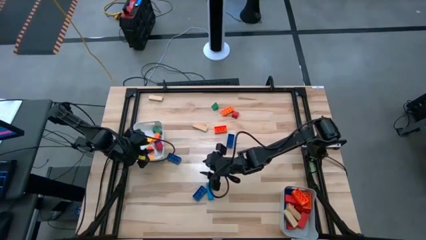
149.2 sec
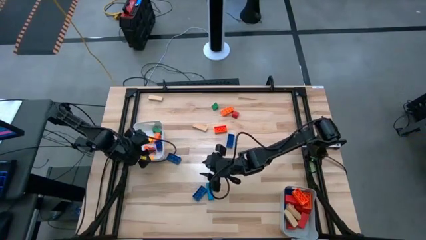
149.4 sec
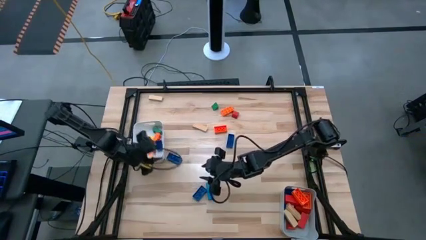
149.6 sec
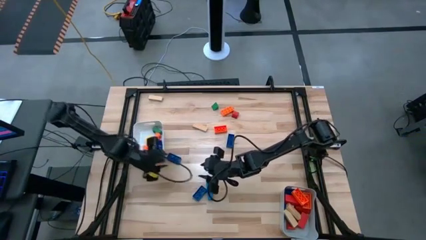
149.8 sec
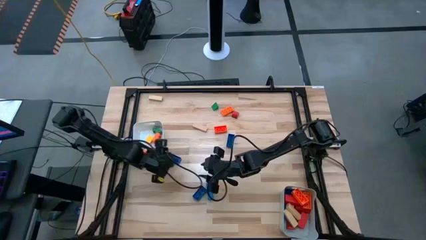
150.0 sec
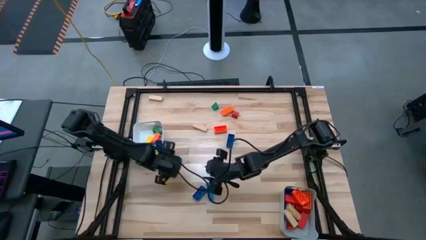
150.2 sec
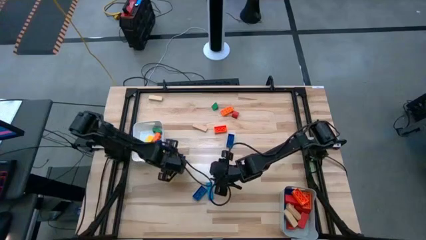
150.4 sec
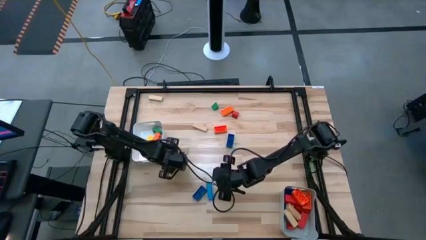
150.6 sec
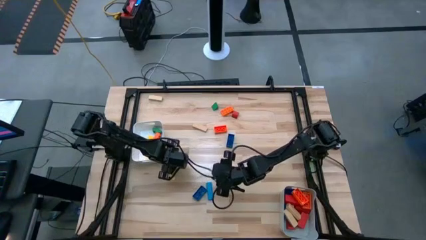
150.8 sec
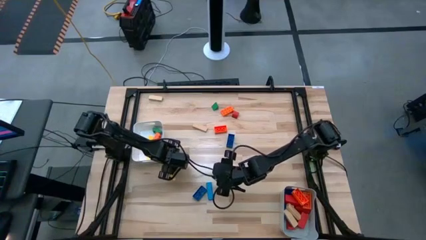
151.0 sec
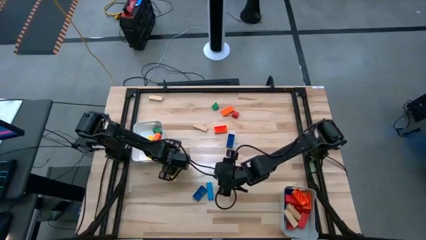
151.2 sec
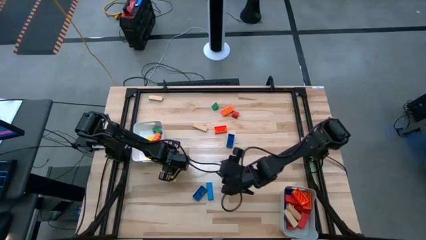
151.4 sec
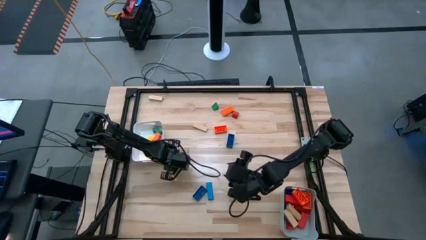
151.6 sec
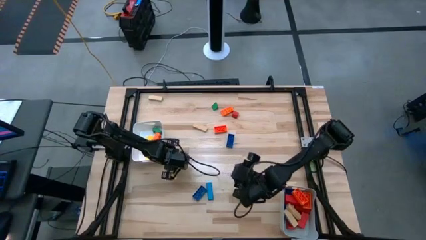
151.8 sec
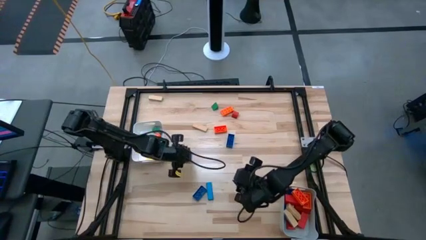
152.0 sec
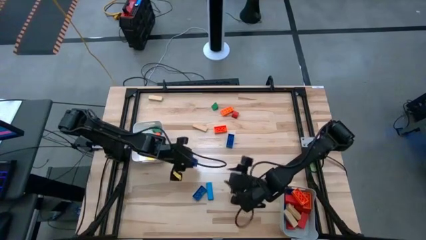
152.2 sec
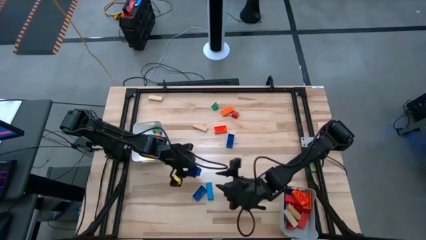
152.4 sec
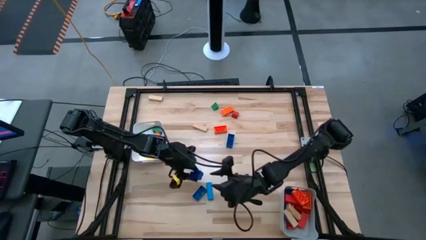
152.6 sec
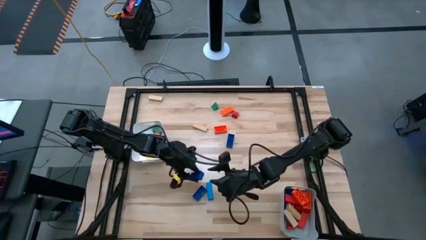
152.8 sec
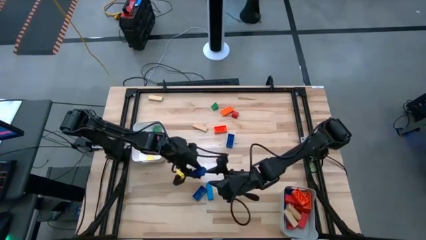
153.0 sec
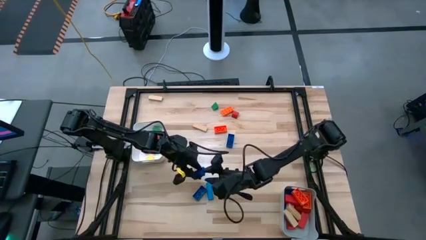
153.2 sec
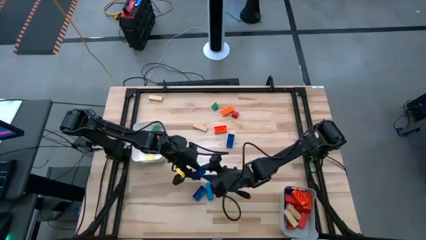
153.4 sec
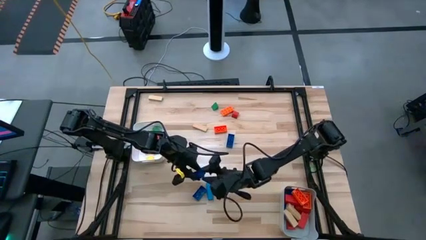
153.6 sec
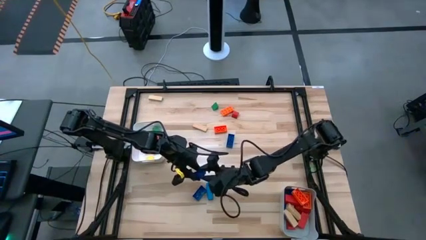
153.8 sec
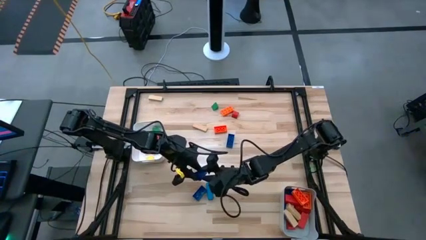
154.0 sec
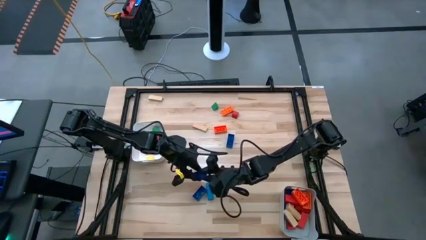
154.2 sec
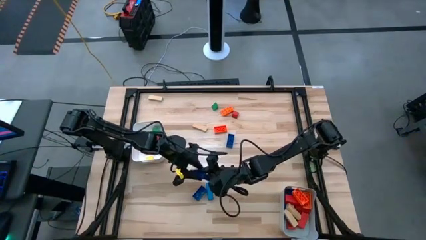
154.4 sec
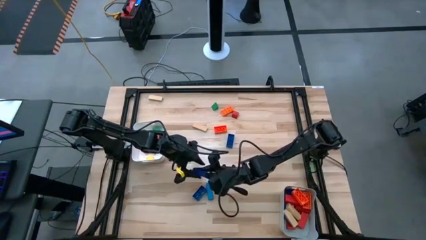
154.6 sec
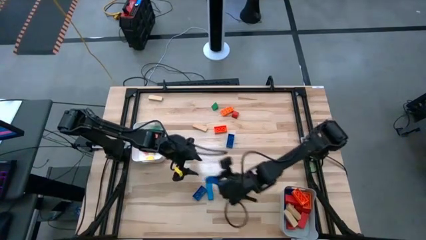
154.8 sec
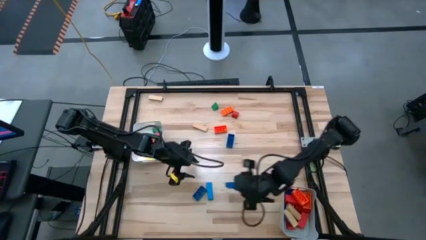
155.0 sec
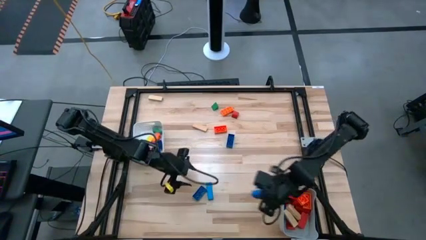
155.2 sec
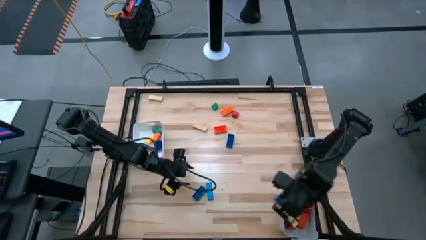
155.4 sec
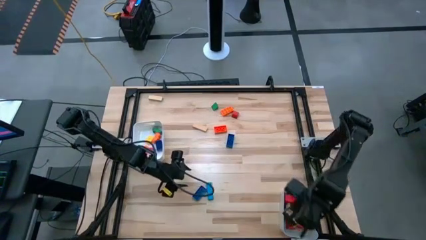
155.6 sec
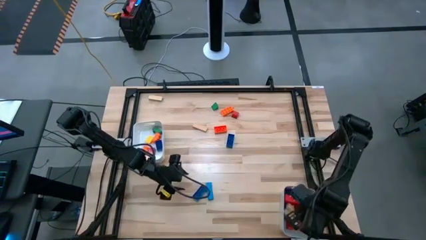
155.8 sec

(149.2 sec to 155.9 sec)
Task: Sort blocks by size
Put the blue large game piece into the gray bin

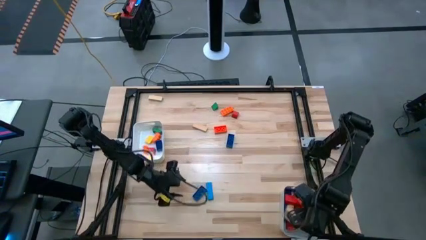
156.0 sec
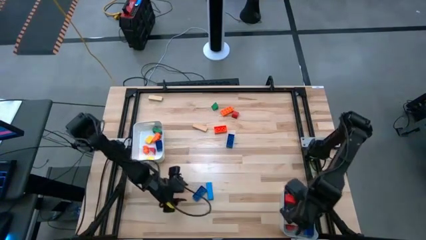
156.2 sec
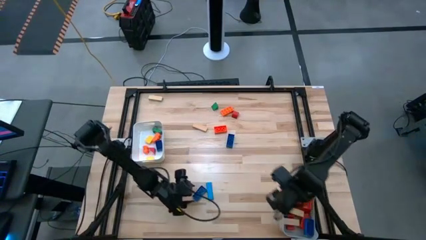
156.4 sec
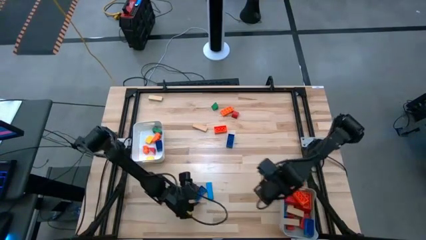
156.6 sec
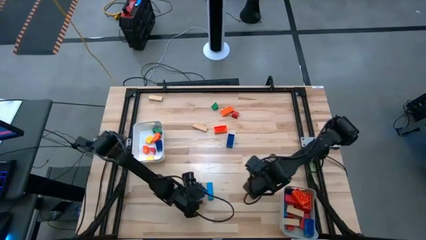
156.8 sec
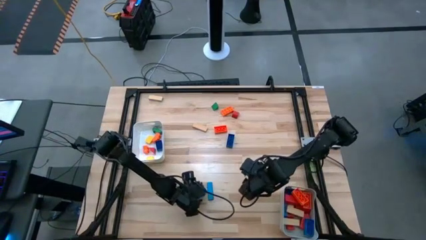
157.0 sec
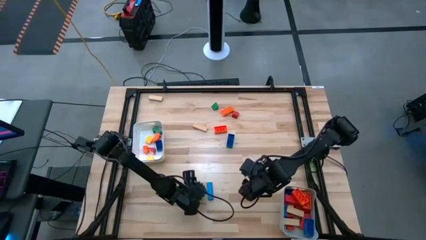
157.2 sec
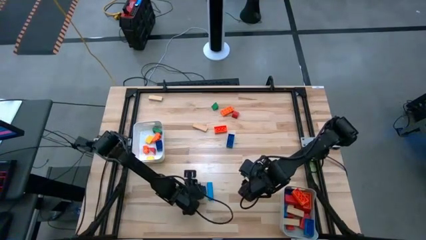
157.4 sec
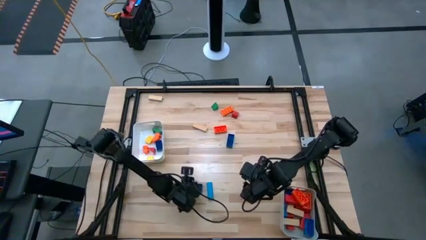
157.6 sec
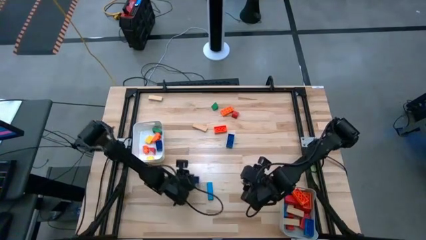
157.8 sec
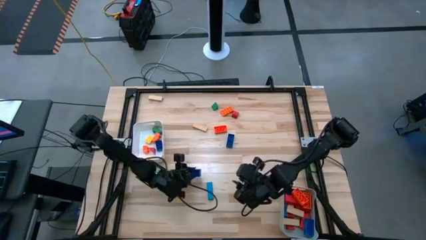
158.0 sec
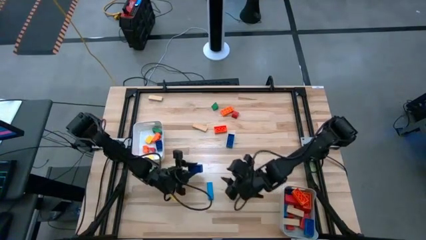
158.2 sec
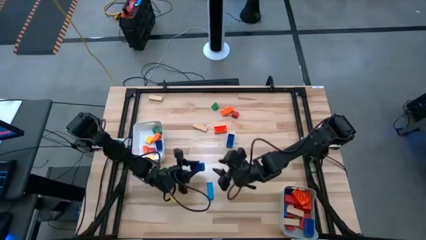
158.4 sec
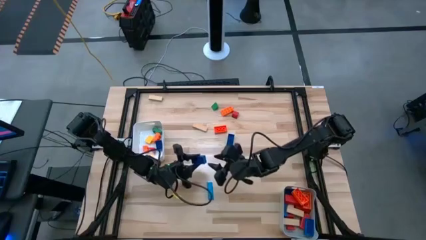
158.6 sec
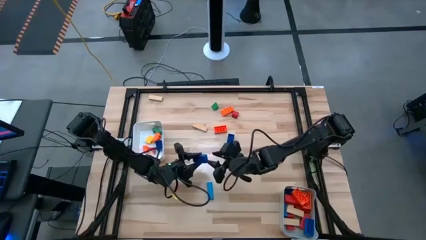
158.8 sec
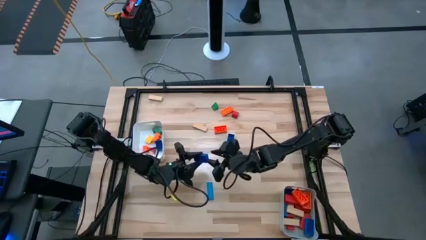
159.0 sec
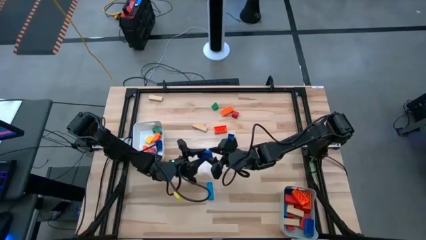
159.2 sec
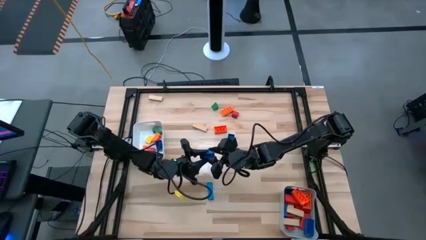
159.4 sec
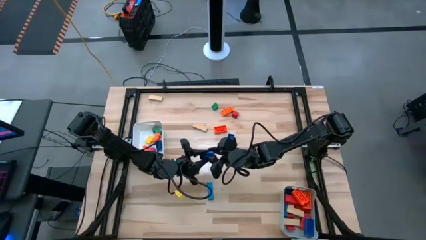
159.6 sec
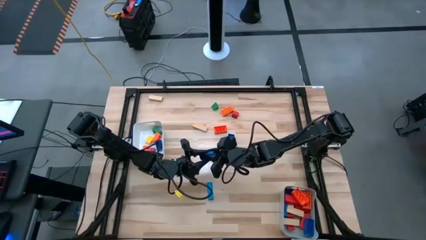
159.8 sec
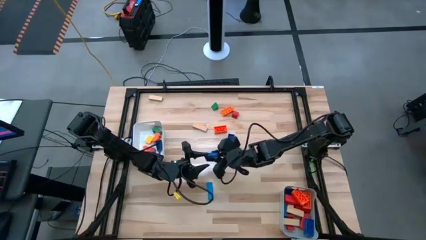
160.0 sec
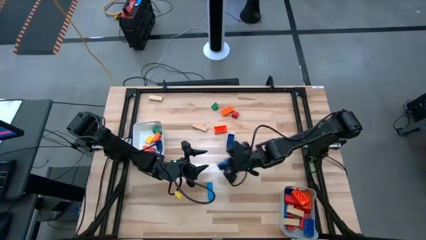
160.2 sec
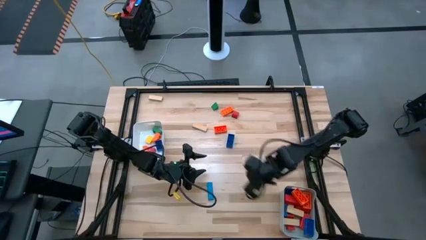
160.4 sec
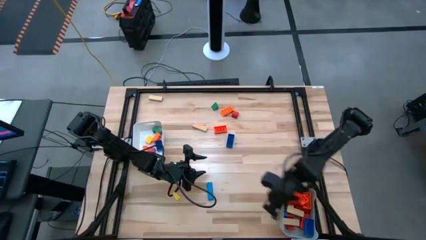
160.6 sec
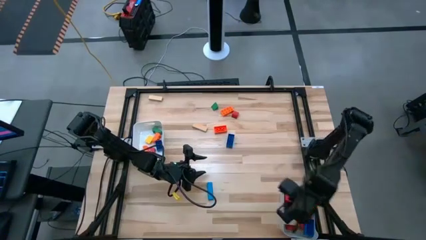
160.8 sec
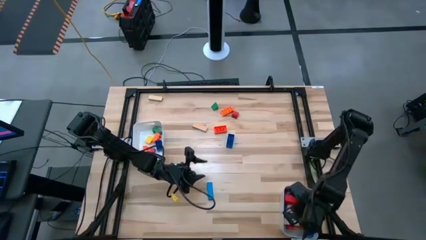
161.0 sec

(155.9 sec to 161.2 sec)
Put the blue large game piece into the gray bin

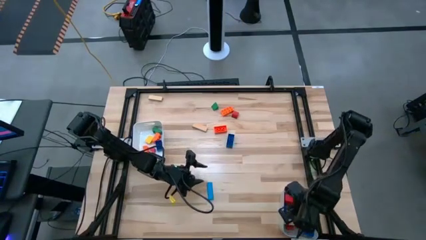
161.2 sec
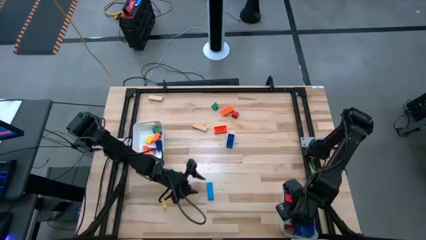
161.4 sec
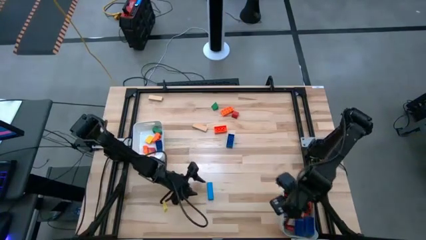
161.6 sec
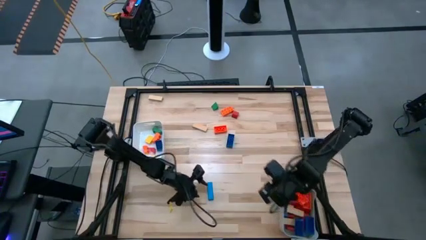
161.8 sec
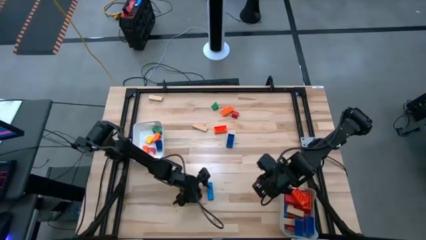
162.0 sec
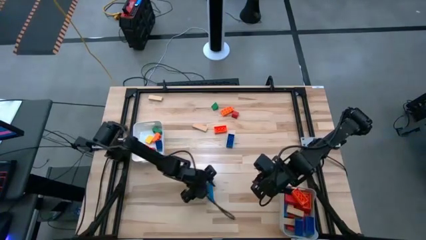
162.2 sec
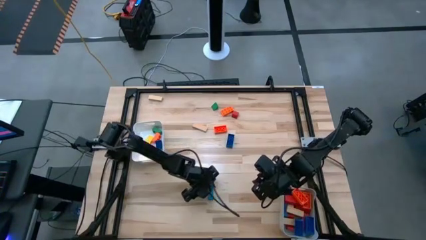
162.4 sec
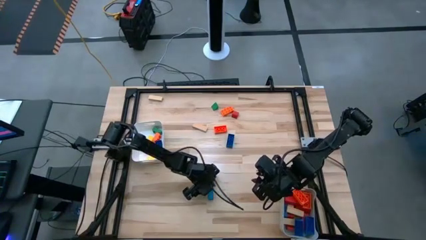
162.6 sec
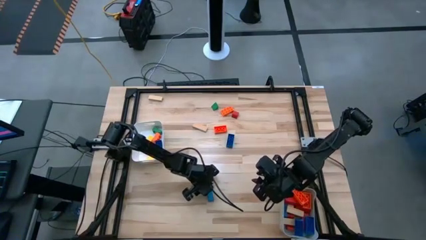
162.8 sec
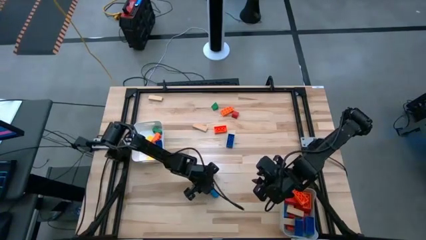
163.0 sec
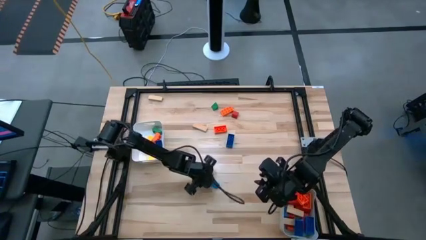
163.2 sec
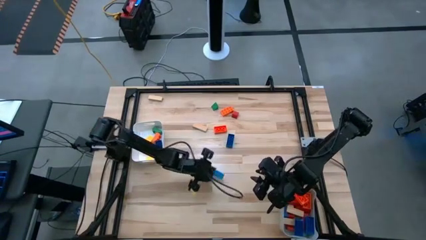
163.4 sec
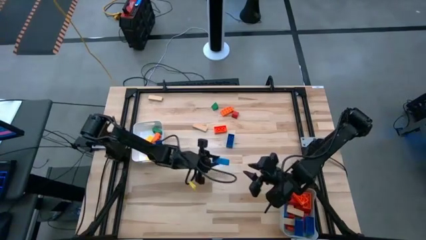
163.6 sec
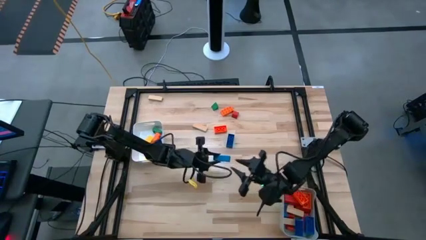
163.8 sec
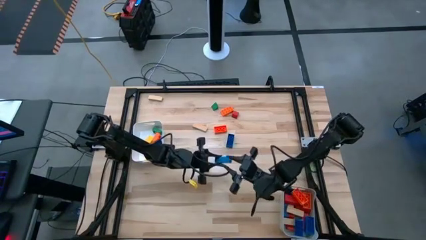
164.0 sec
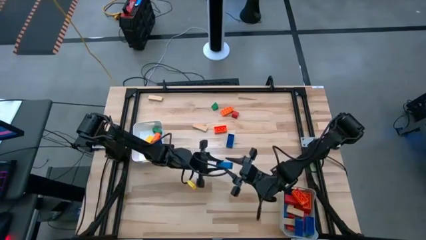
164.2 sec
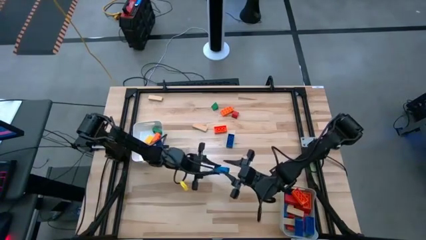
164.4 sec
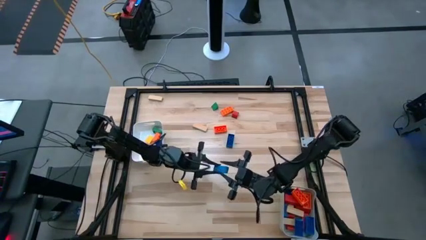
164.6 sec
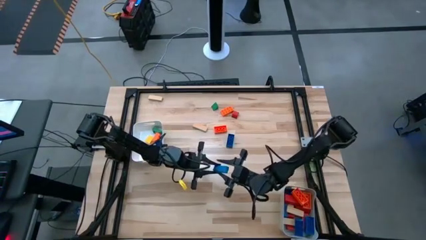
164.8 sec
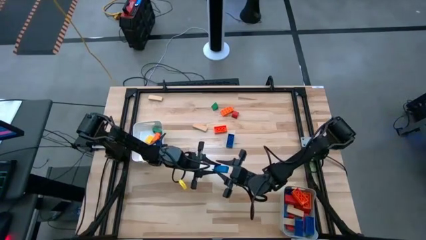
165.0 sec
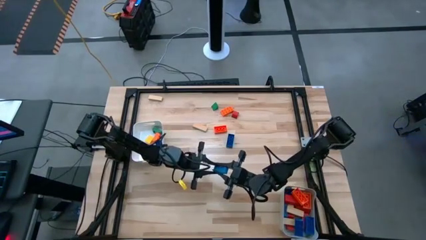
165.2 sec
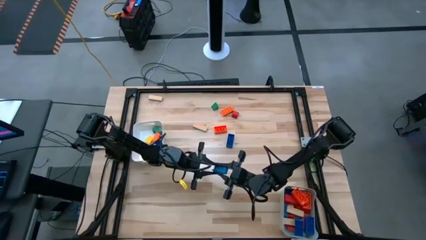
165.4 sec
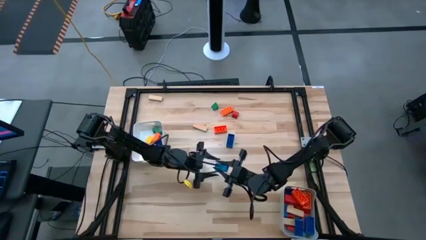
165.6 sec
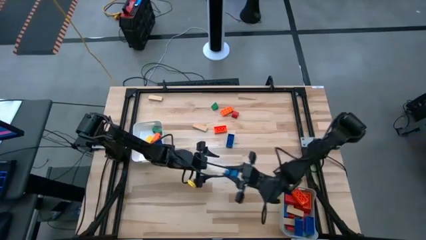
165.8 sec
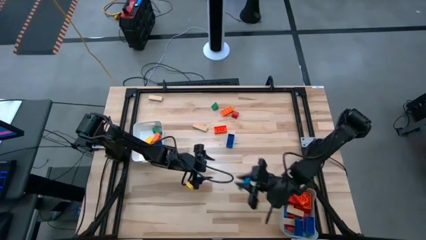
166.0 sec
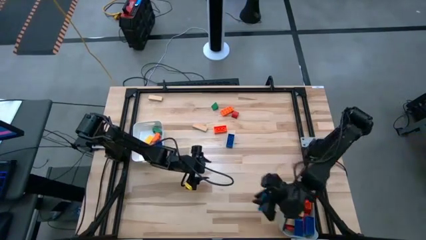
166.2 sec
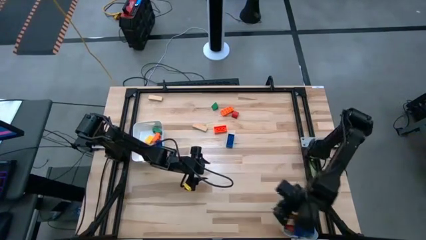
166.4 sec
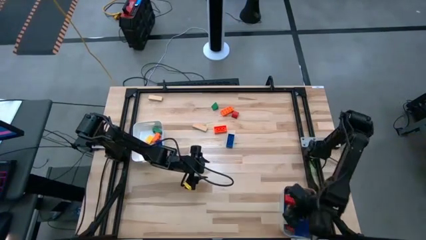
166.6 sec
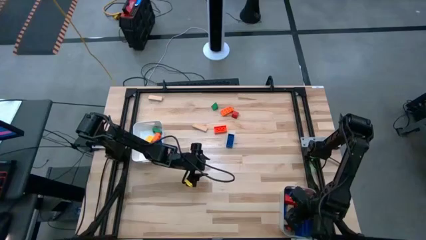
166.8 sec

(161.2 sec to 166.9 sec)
Put the blue large block into the gray bin
